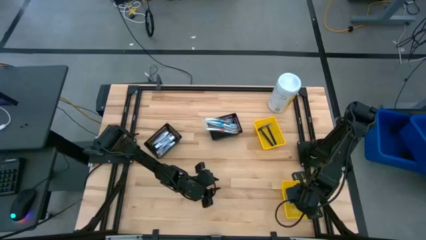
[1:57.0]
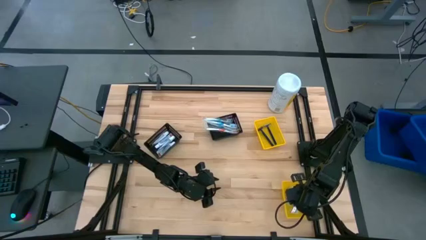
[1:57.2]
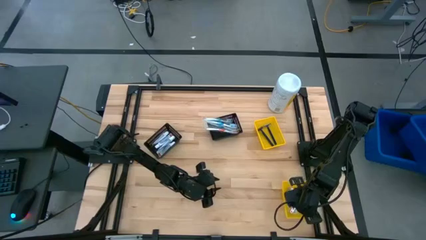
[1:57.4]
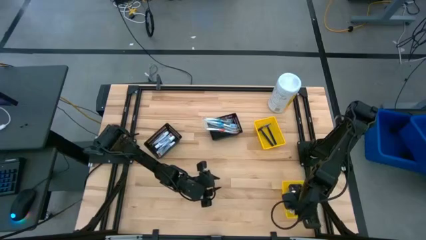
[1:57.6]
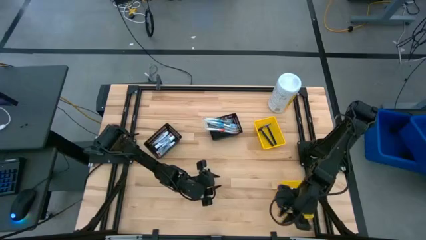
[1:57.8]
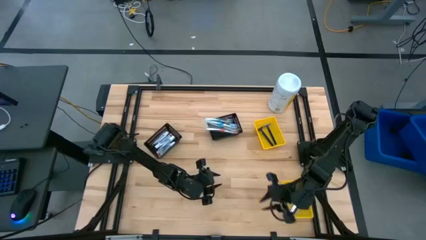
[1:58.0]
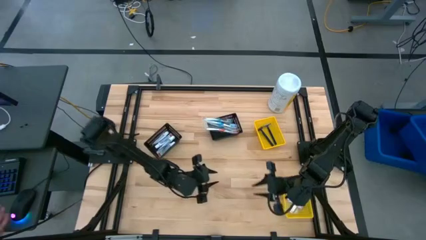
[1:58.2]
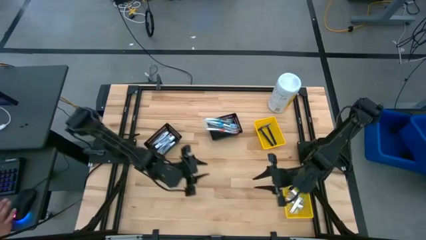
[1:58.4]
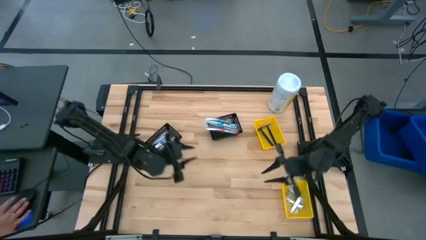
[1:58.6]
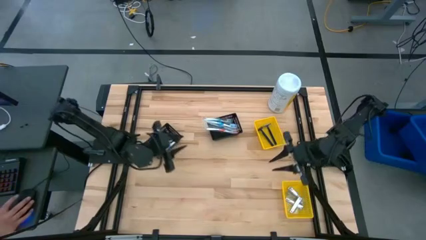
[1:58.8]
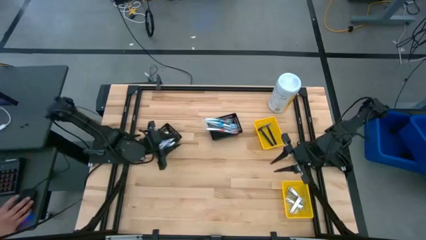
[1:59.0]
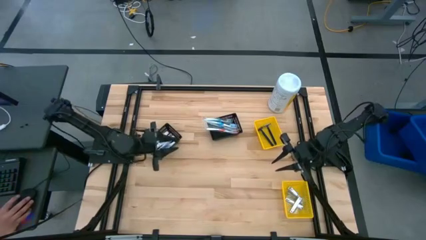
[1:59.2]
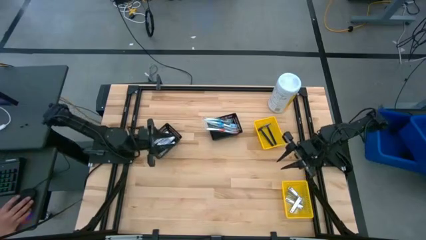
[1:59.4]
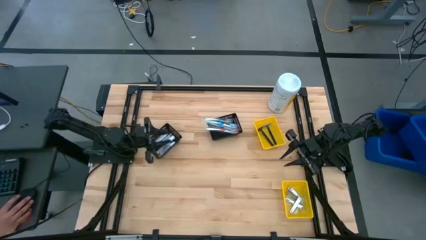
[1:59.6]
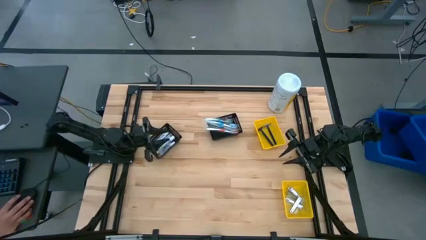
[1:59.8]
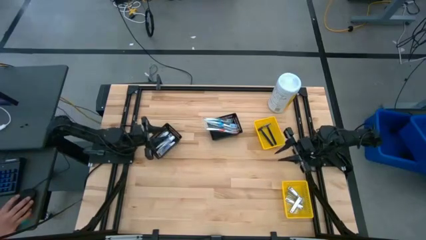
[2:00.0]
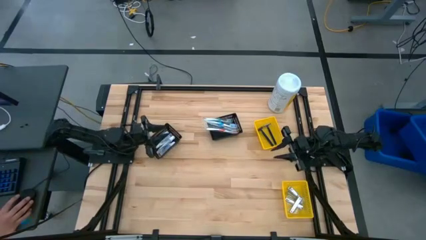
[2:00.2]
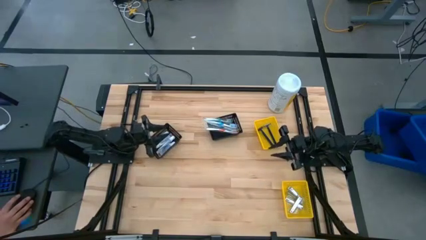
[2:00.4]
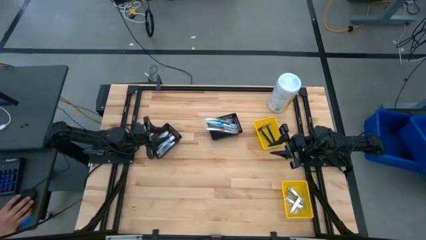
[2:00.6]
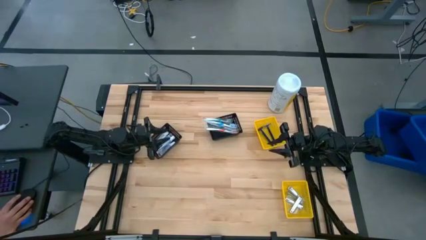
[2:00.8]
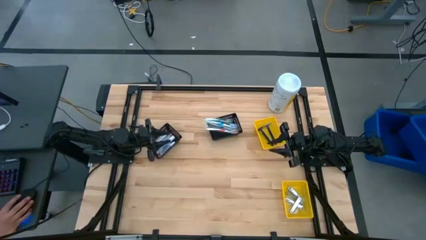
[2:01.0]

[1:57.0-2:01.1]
Task: Pick & Place Travel size toiletries
Return to Home Position

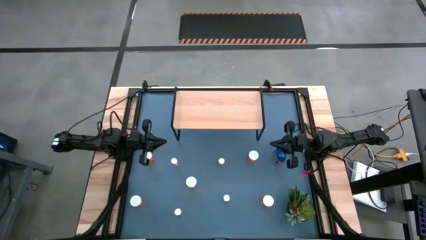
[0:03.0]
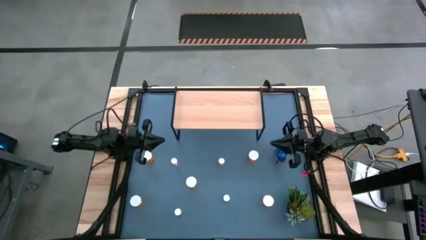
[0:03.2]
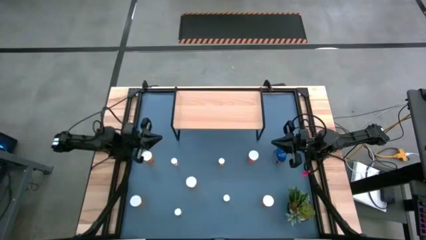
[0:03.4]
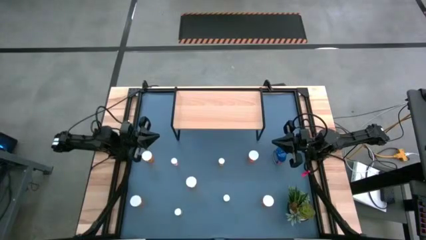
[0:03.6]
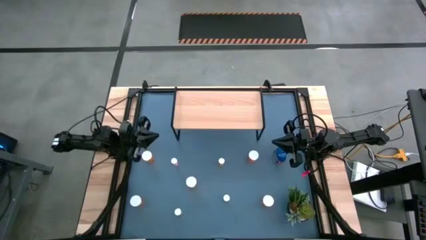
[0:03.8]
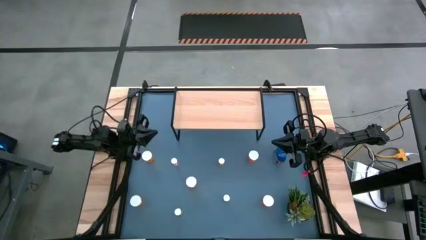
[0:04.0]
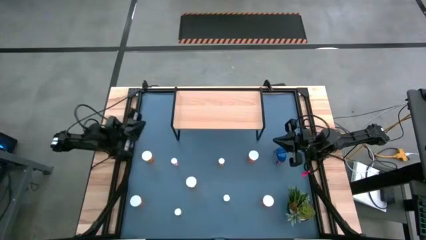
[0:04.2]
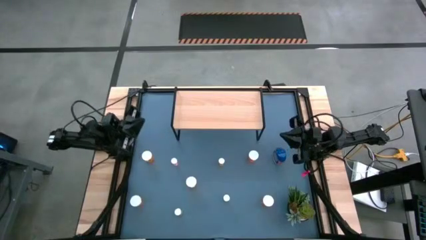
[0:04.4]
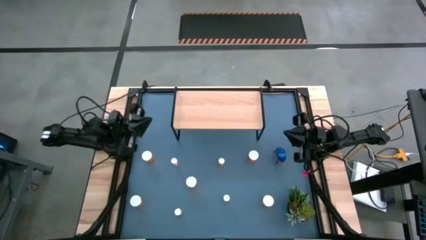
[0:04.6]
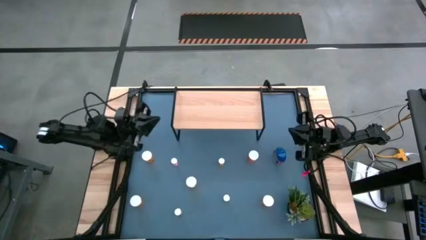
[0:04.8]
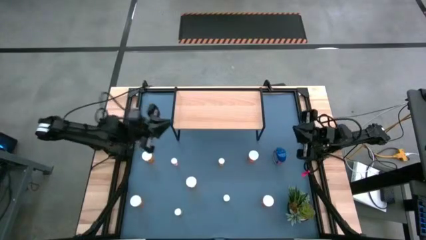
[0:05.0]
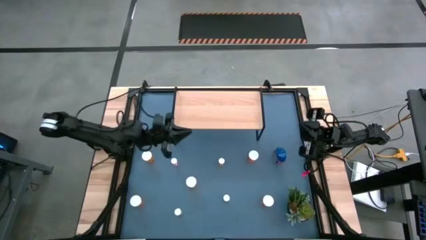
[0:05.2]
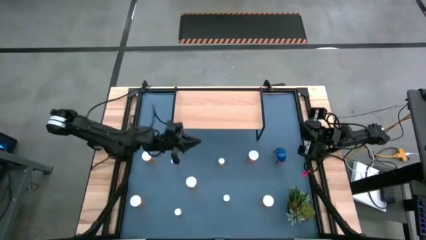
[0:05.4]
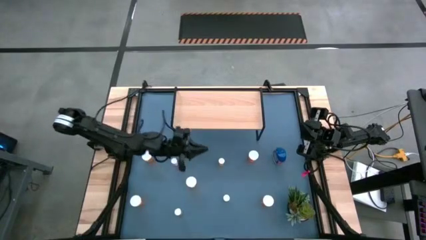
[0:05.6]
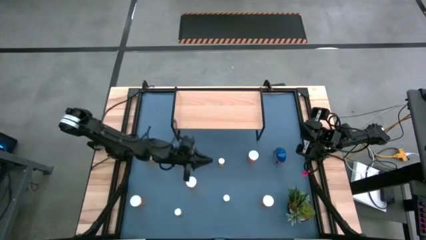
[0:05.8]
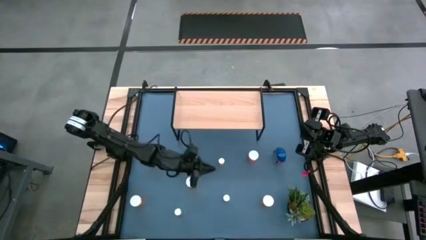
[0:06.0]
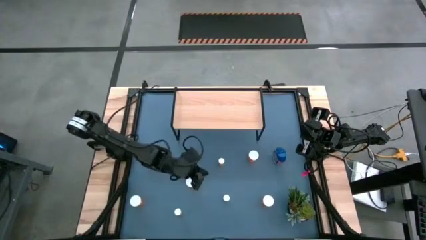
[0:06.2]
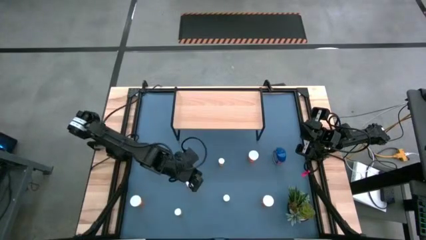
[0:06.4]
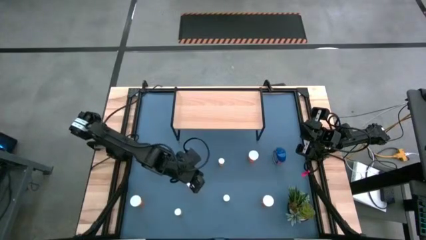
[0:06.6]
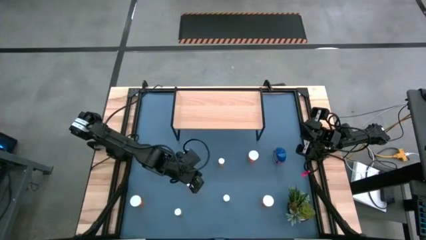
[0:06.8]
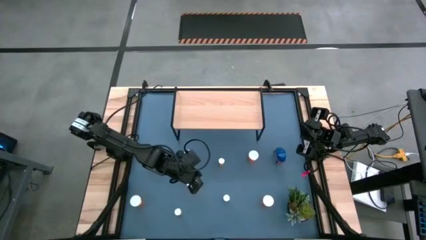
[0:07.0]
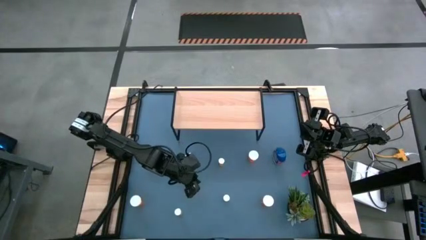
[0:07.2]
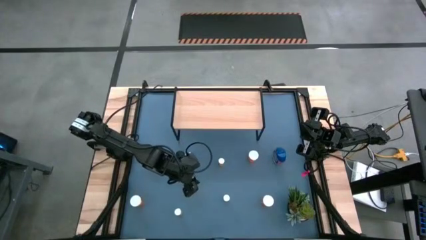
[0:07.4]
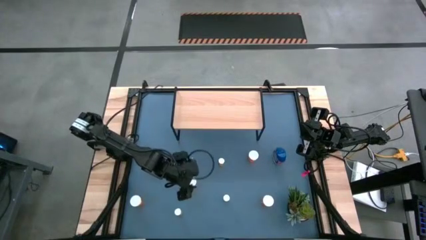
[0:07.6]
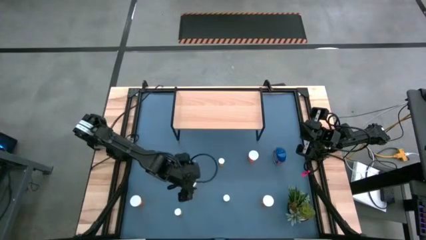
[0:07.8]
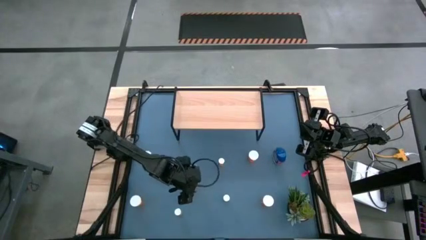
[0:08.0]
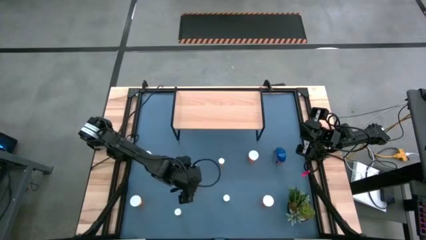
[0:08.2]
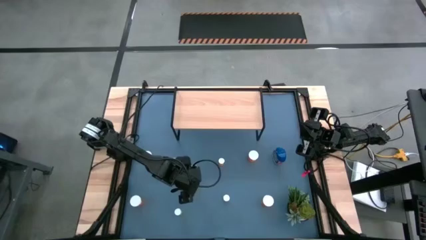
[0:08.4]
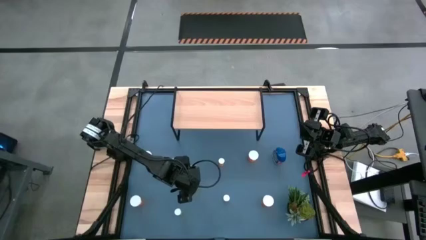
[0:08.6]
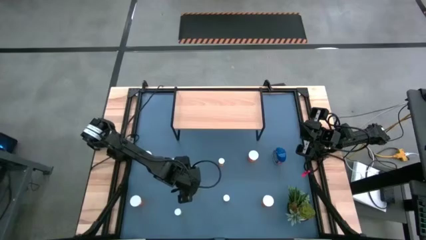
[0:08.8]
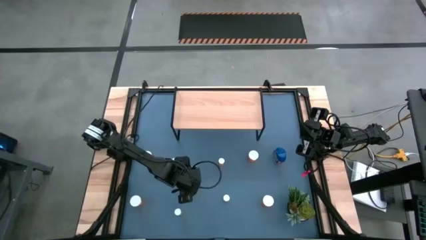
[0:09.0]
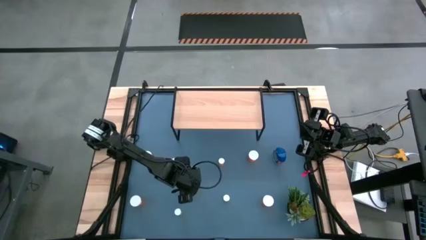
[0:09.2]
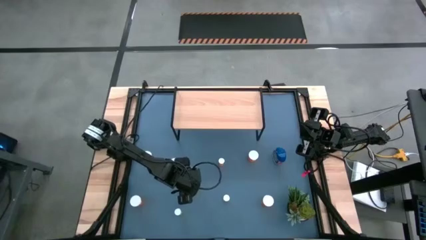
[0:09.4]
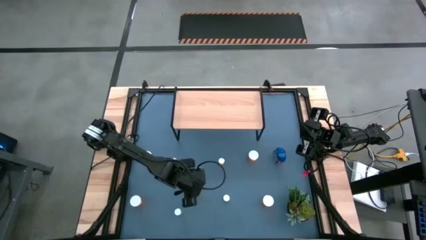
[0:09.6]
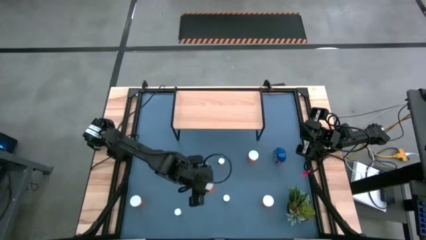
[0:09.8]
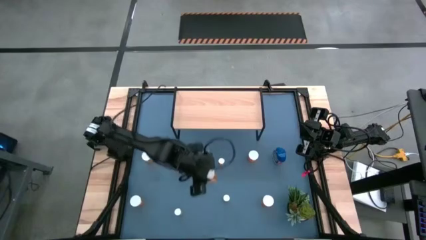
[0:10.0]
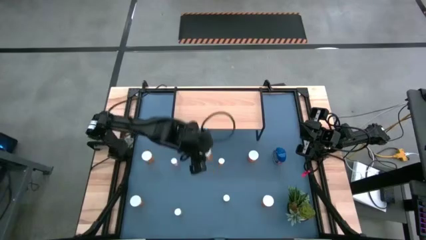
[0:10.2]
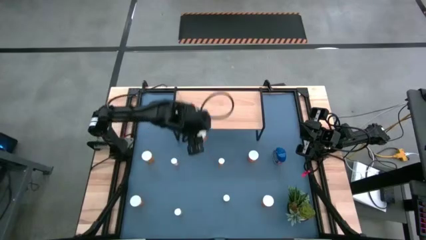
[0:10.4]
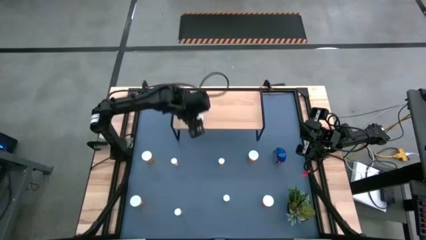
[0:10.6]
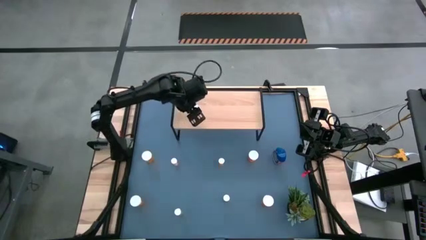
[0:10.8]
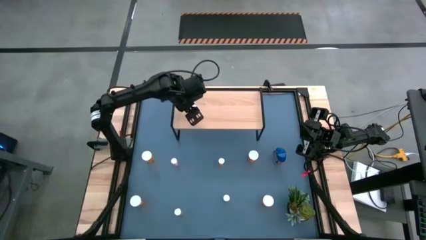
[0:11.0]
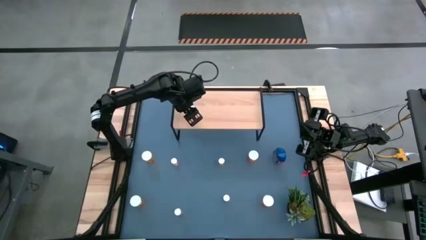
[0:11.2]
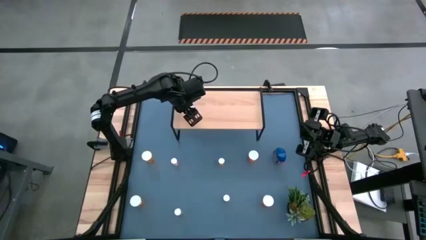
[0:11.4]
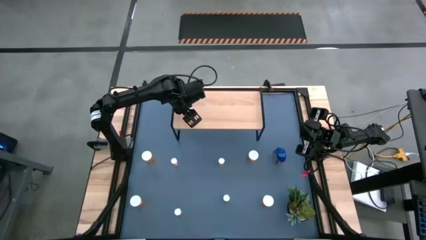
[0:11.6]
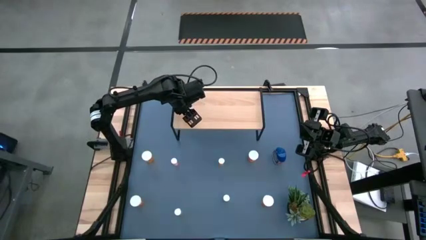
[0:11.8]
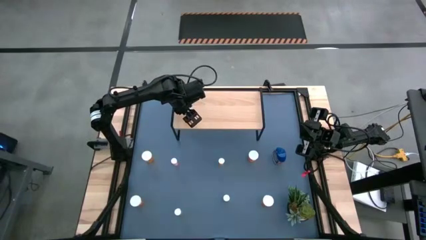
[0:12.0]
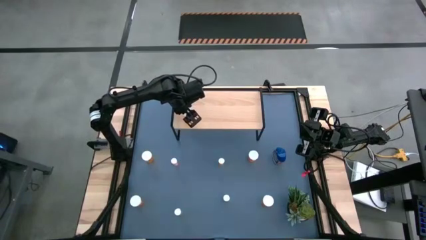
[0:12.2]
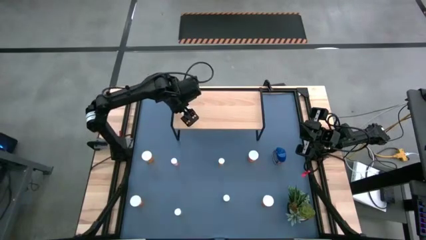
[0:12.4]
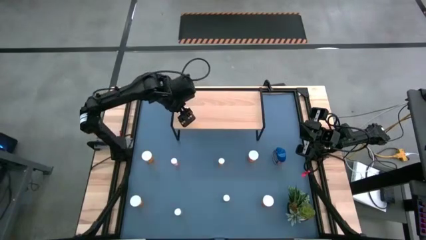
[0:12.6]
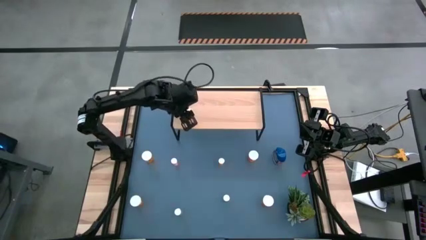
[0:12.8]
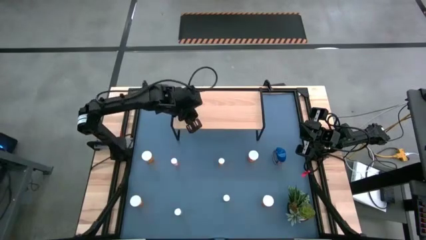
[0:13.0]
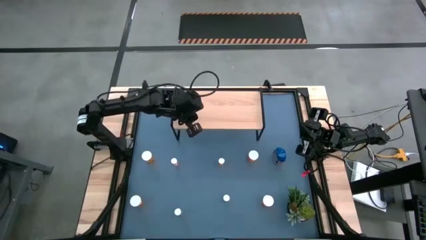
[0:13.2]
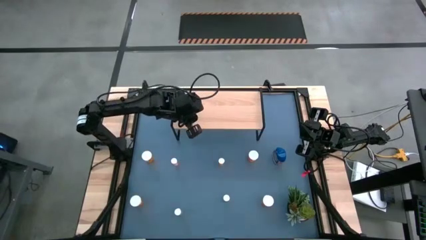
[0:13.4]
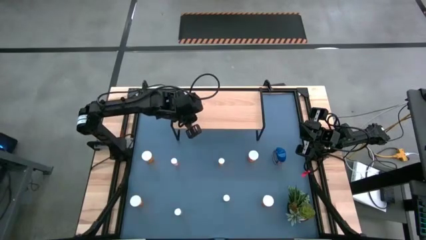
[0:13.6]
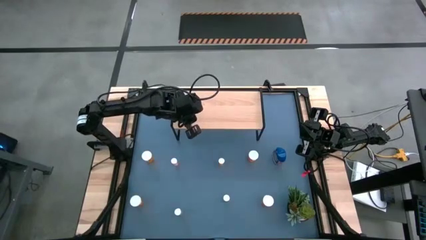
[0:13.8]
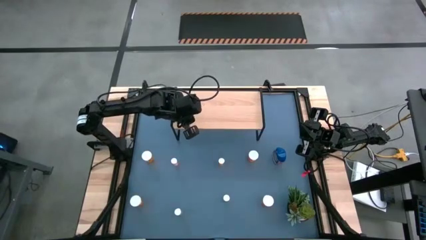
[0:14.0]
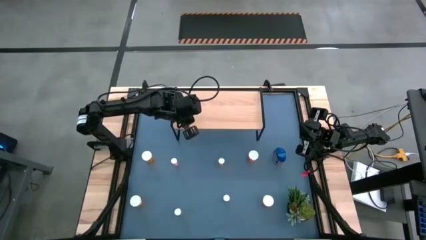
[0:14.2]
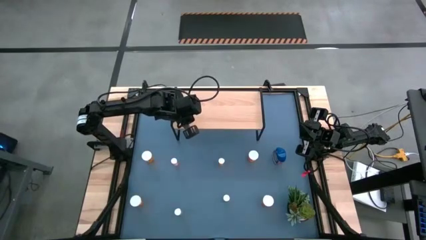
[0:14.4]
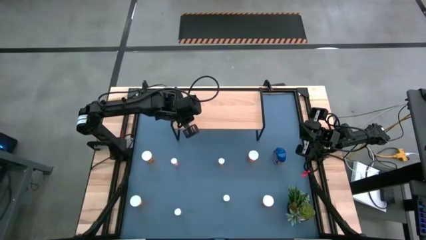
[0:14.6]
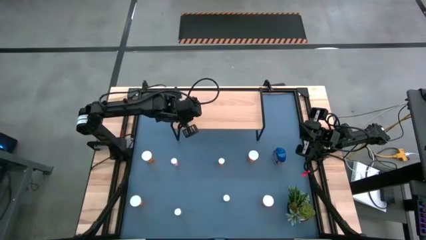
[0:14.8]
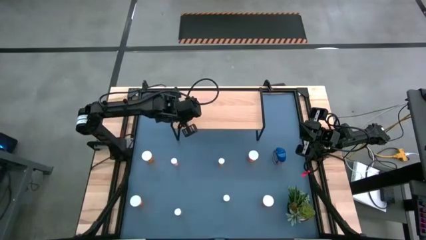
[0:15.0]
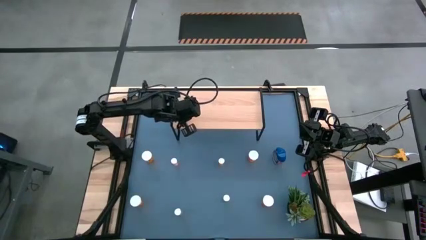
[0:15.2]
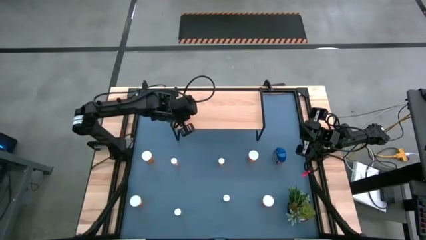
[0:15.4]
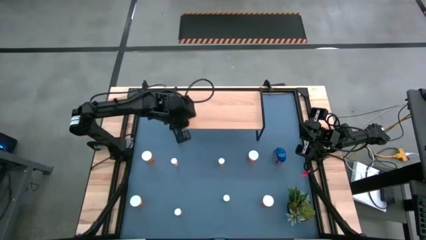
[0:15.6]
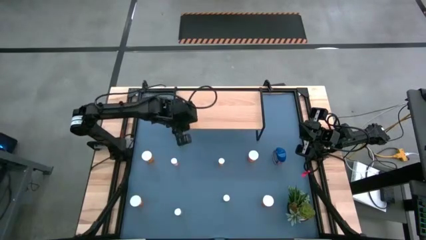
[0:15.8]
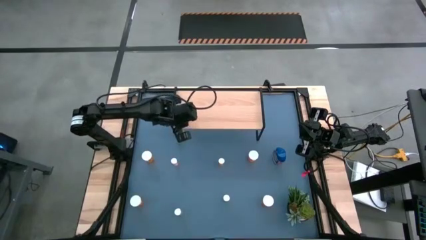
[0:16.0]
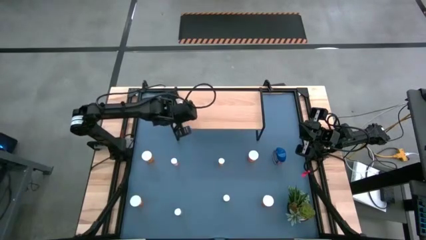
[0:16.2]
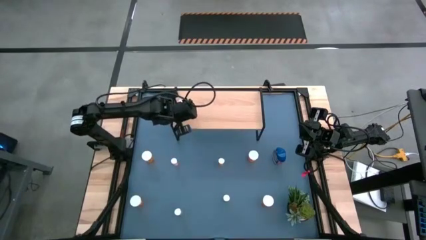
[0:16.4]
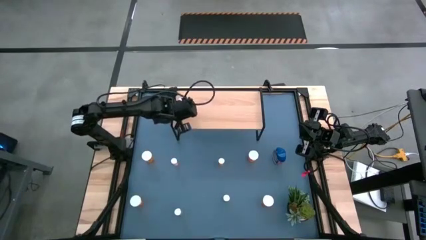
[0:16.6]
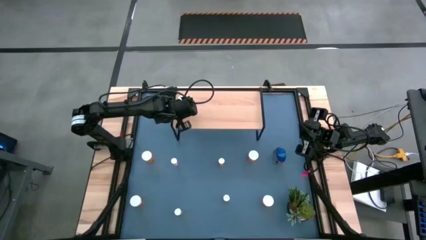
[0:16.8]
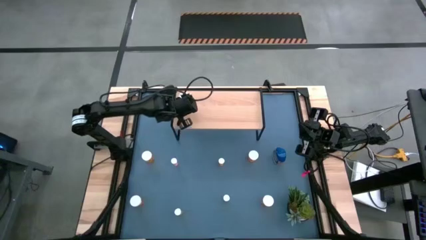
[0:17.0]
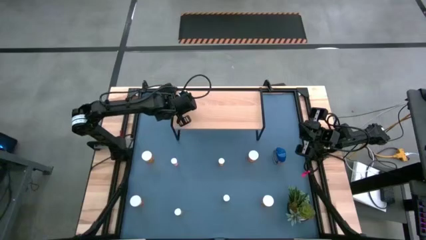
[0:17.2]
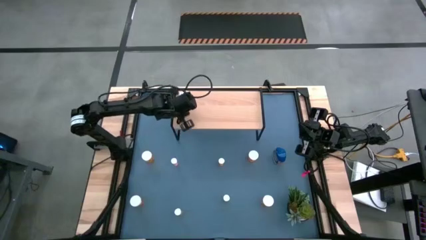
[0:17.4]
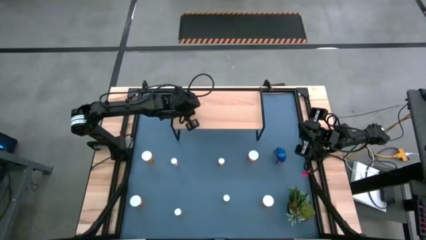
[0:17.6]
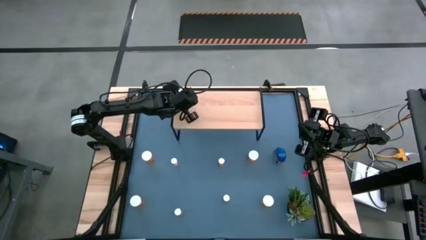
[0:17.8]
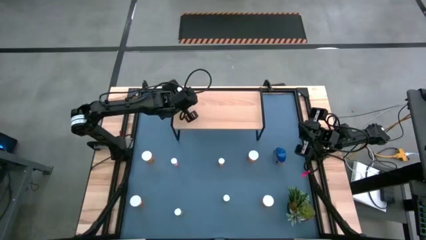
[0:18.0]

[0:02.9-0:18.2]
Task: Pick and place medicine bottles onto shelf by color
Put the large orange pill bottle on the shelf
